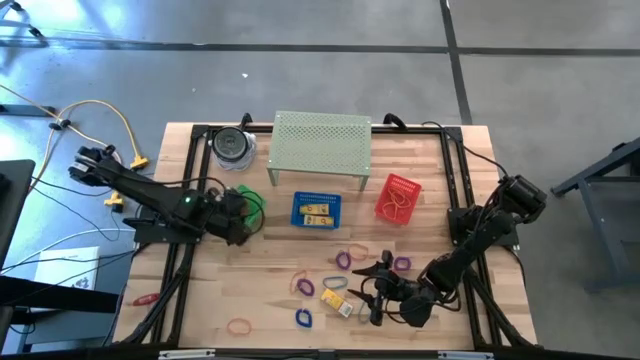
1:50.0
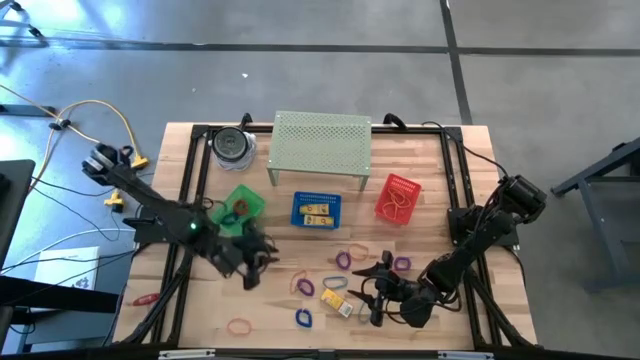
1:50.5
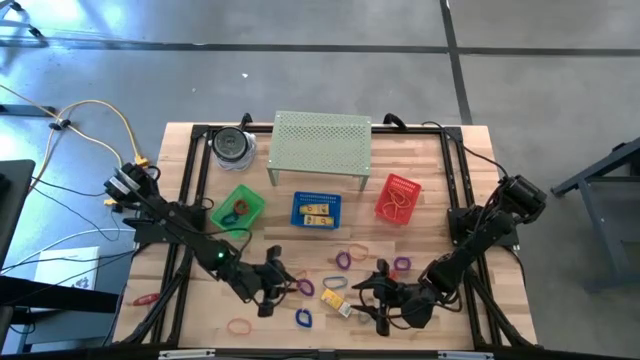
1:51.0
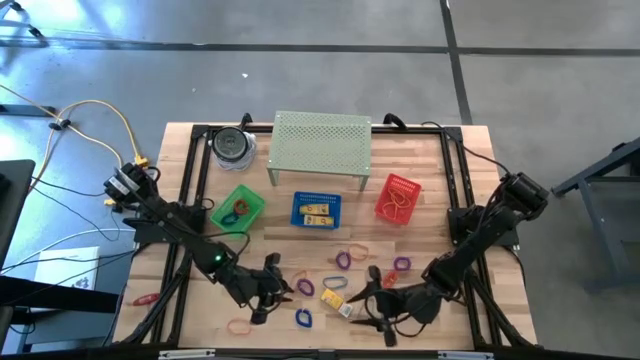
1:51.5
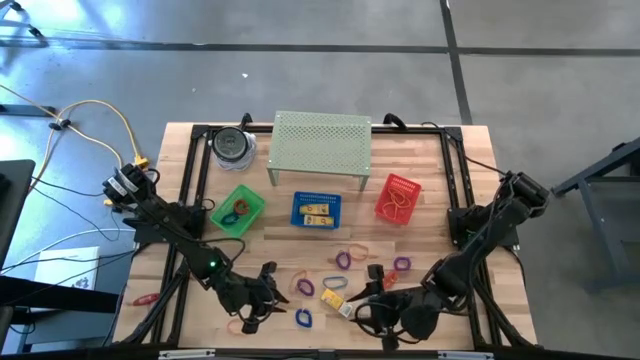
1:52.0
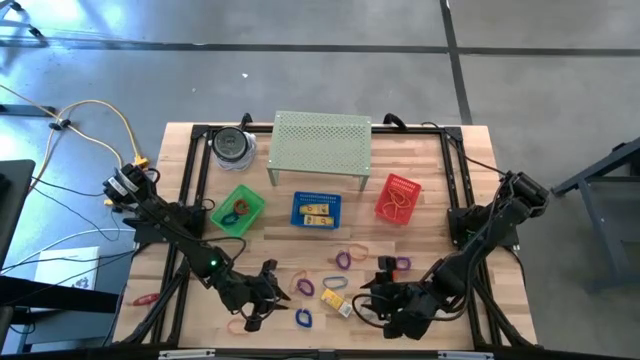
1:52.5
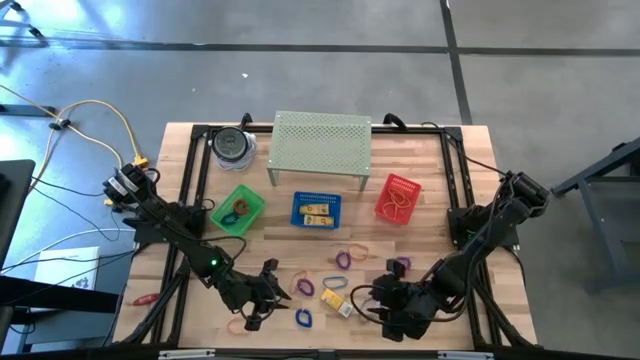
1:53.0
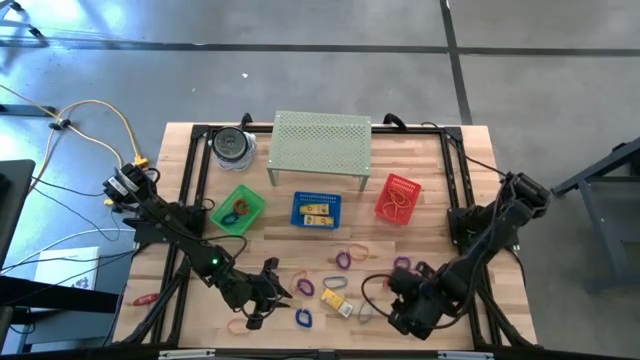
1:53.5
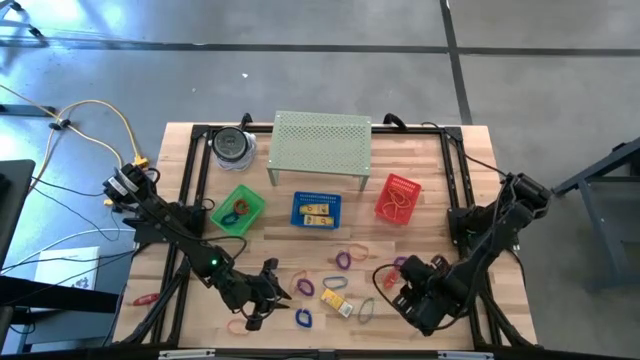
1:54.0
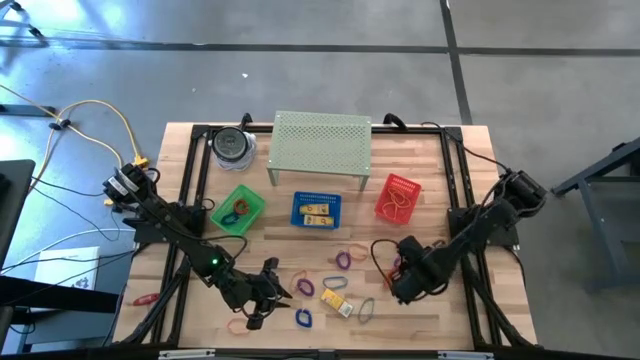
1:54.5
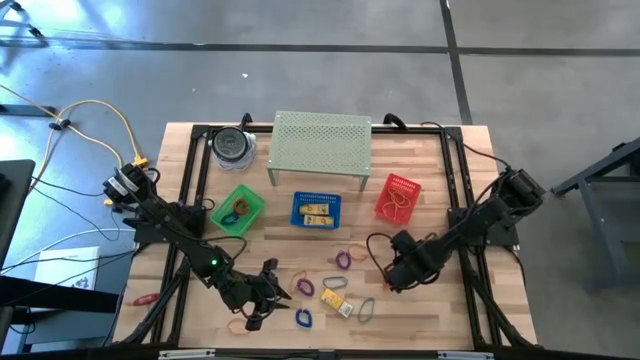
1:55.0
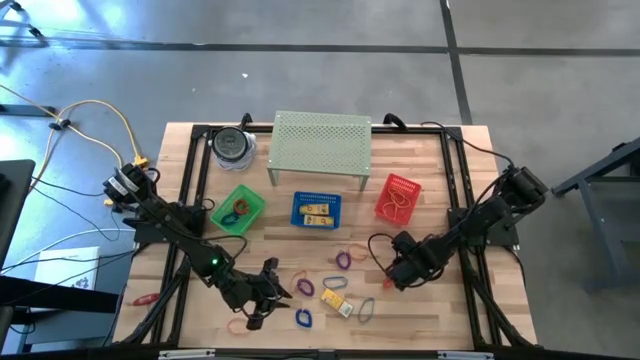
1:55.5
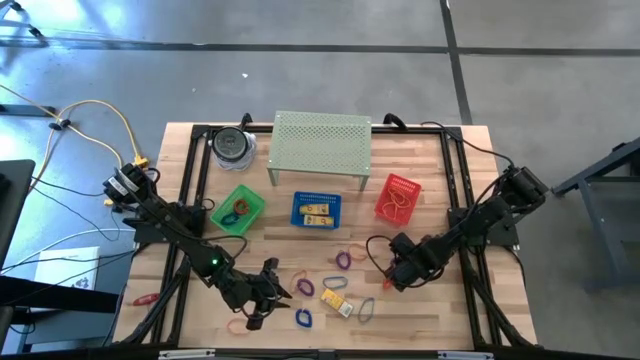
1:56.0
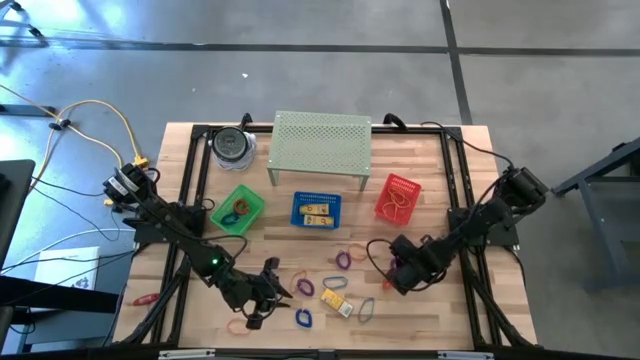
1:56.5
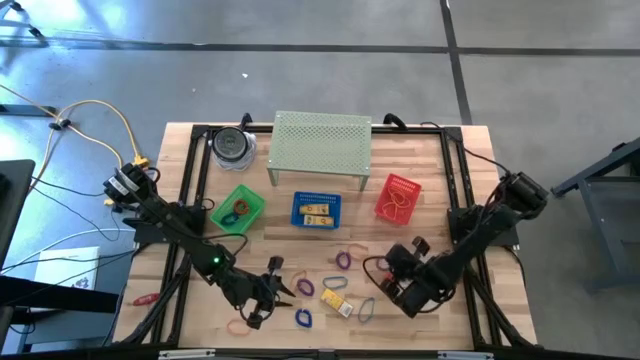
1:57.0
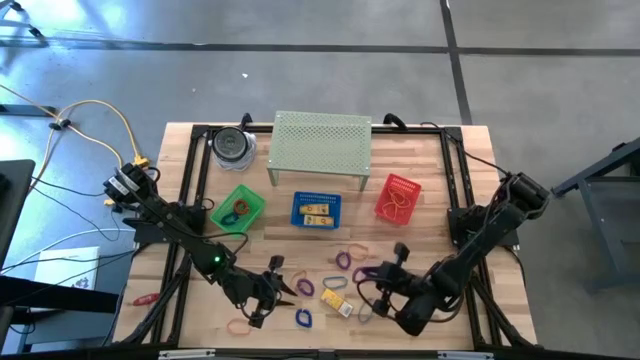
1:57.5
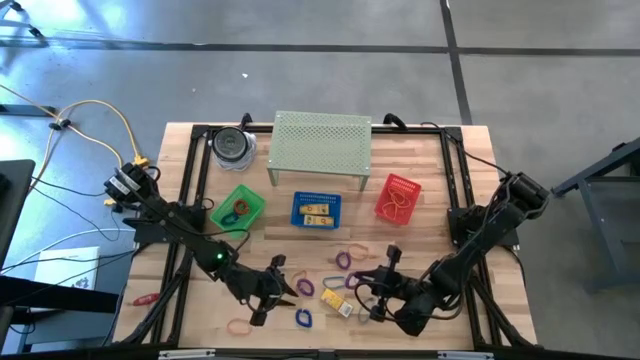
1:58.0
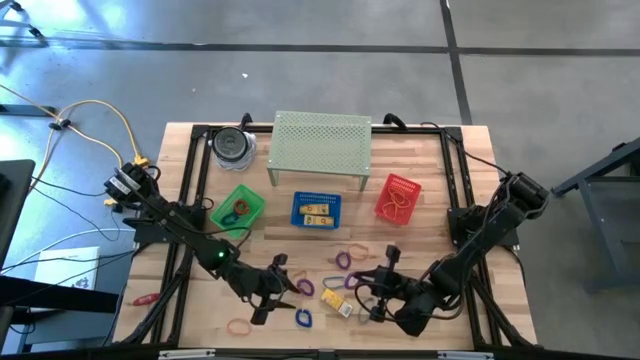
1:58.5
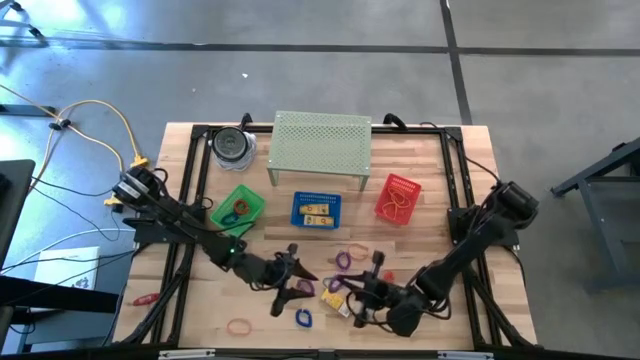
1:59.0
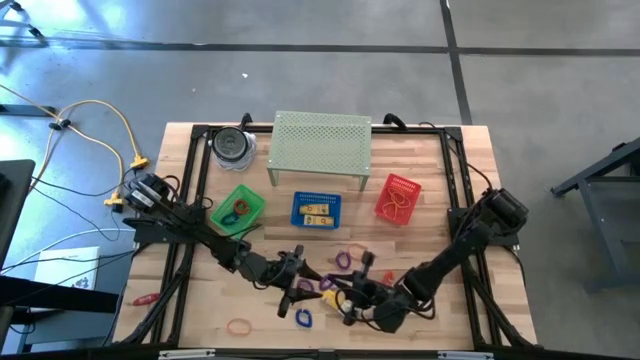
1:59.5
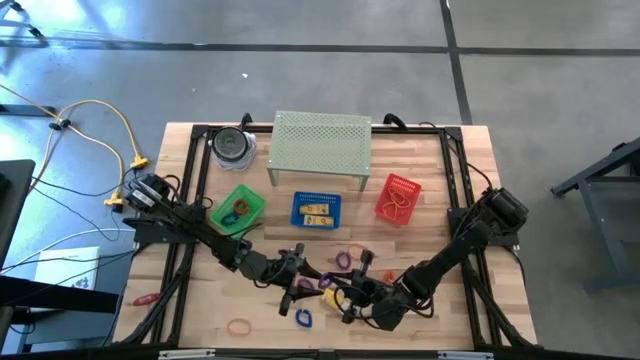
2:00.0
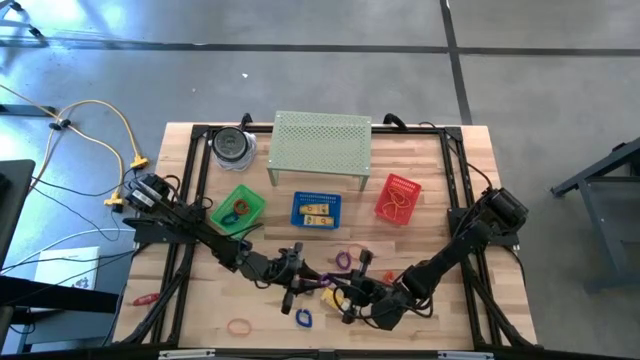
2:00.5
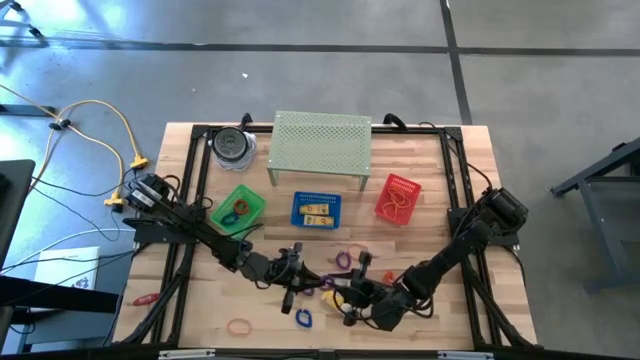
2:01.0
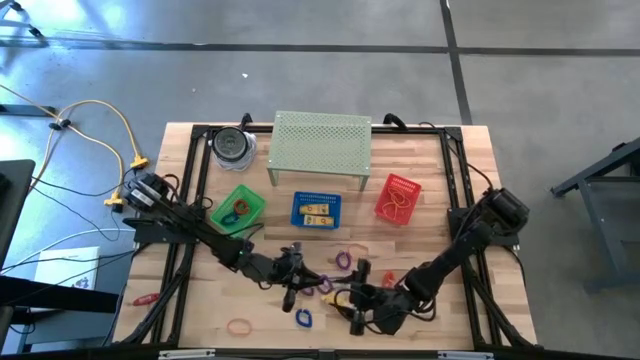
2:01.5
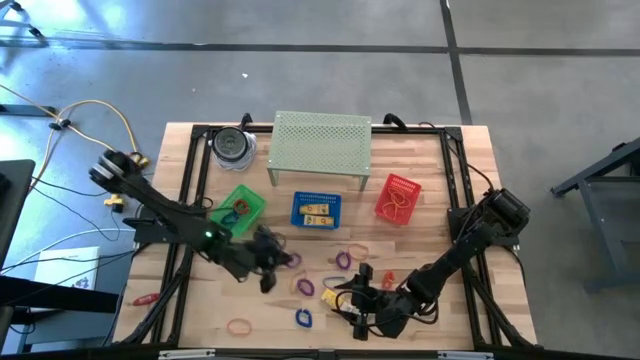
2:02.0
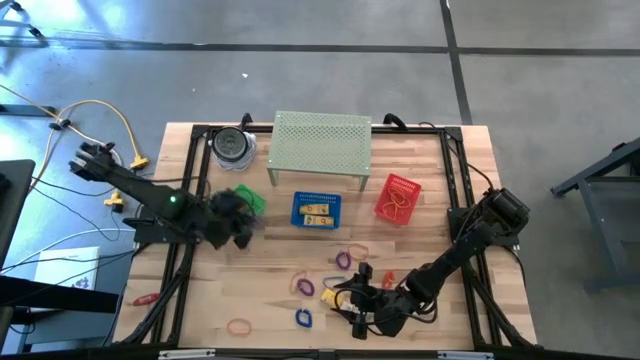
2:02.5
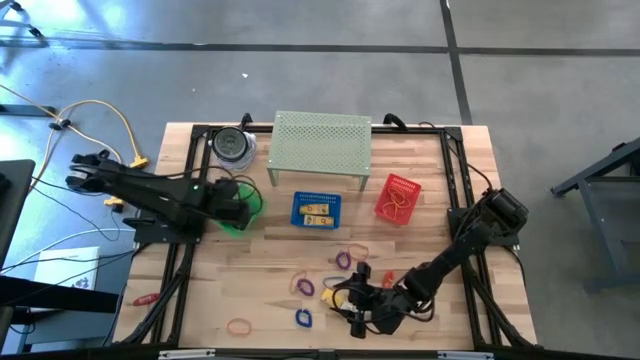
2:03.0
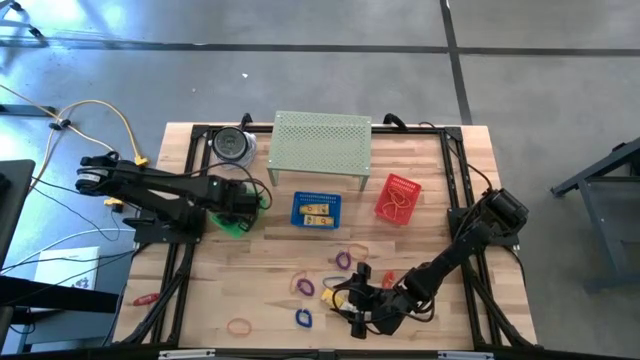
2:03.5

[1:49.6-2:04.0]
Task: Pick & Place Office Desk Supplies
Put the purple spring key chain into the green bin

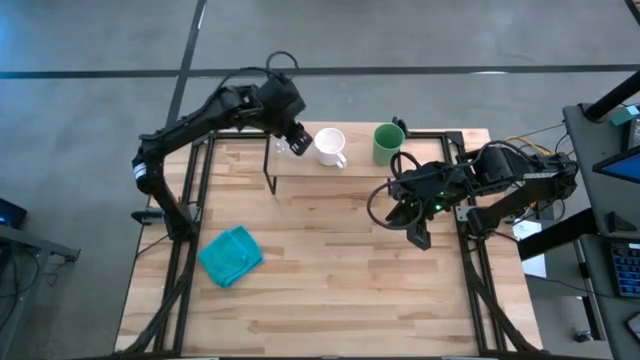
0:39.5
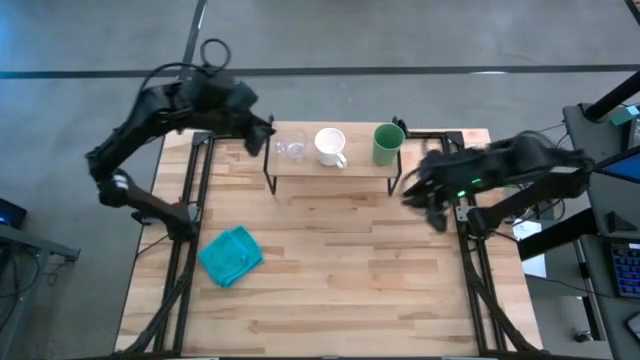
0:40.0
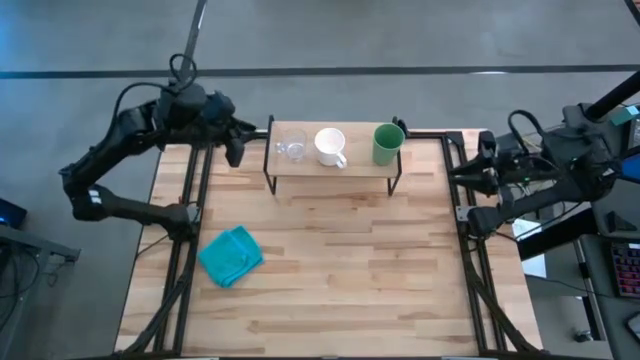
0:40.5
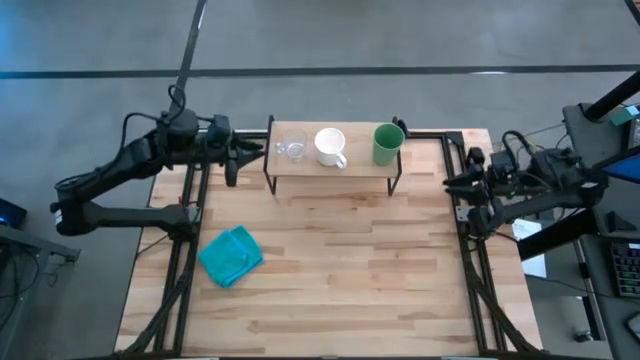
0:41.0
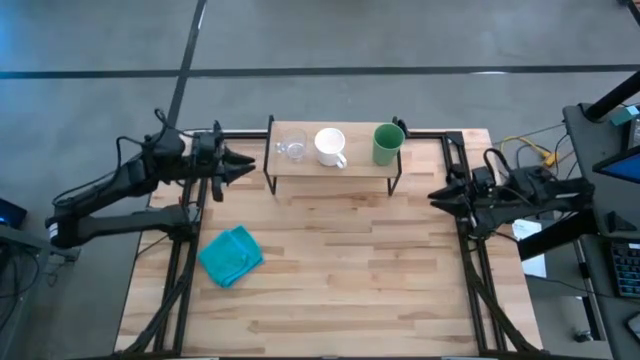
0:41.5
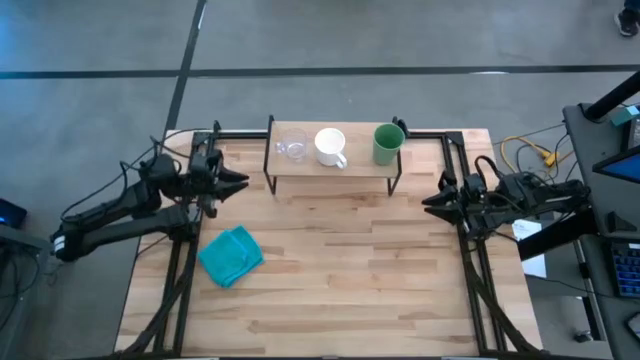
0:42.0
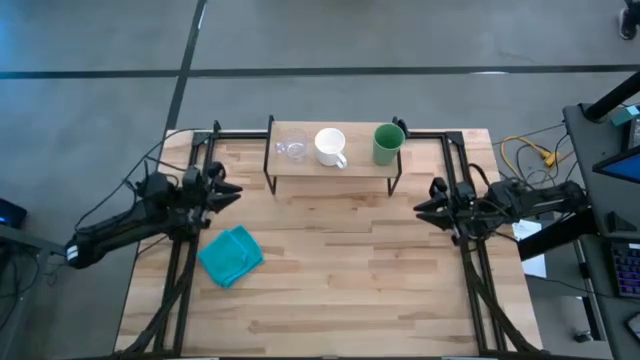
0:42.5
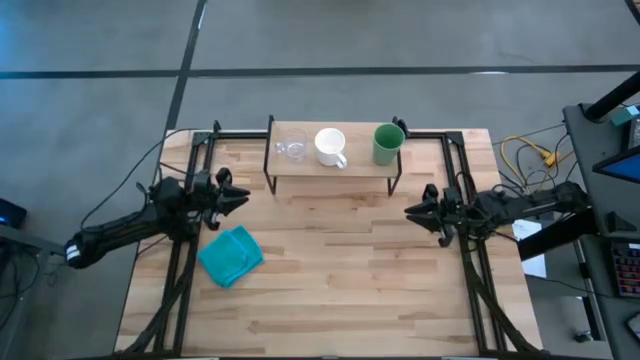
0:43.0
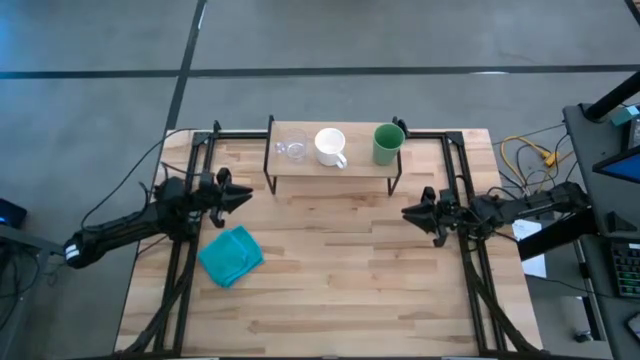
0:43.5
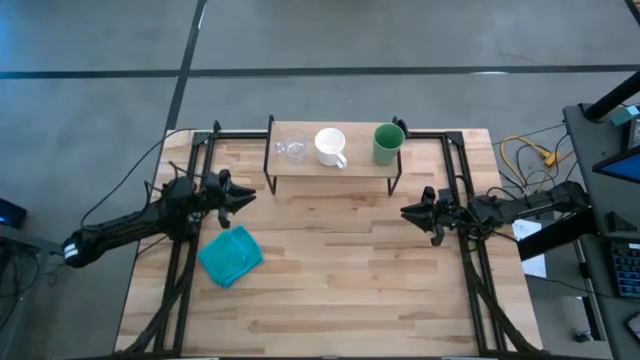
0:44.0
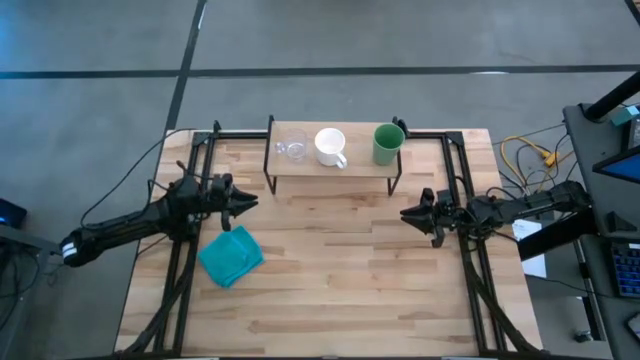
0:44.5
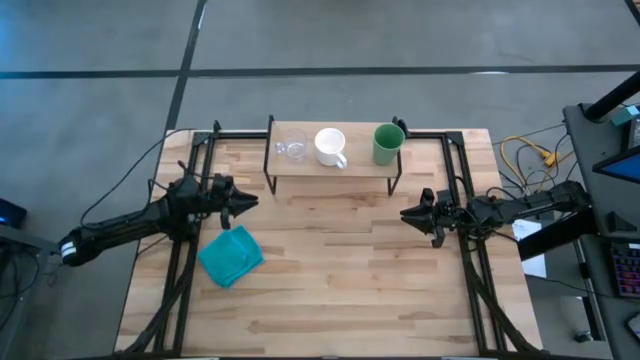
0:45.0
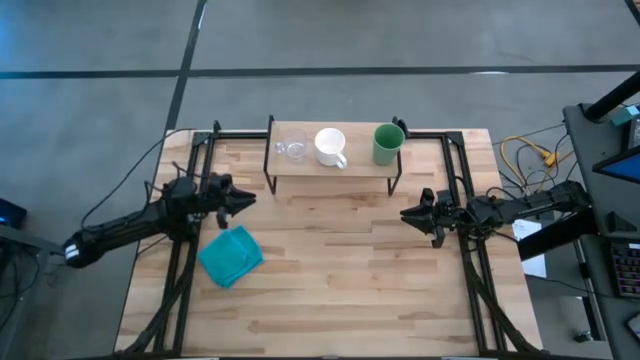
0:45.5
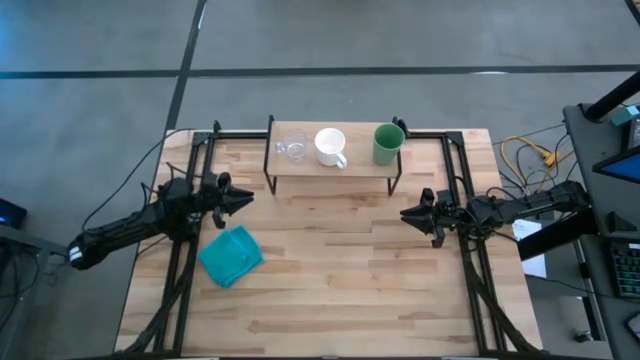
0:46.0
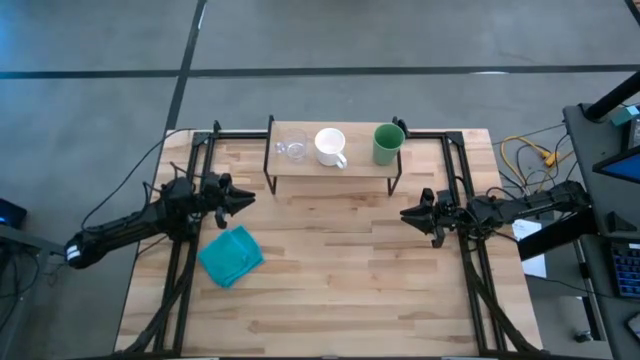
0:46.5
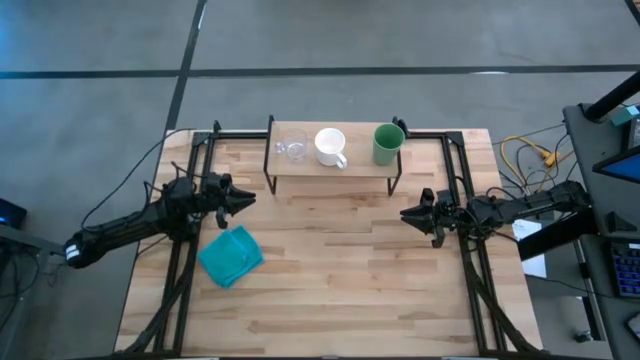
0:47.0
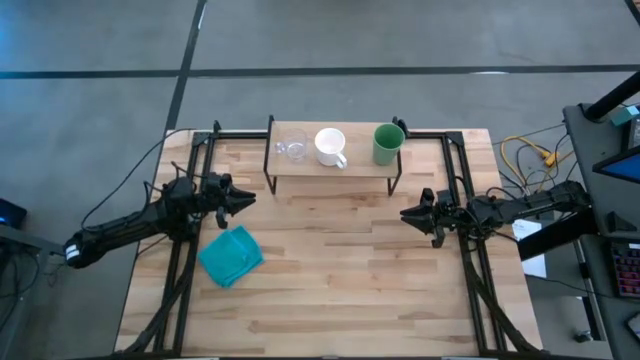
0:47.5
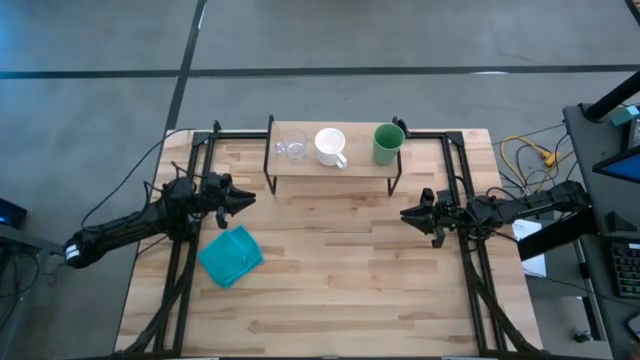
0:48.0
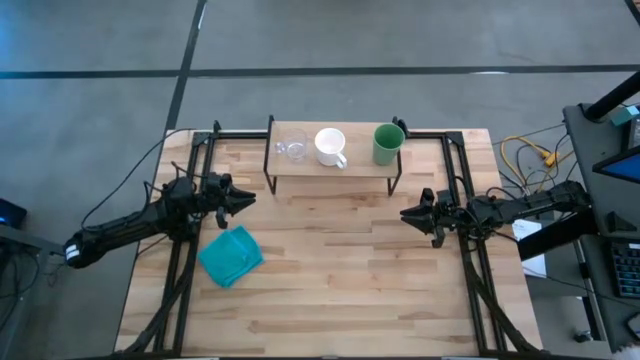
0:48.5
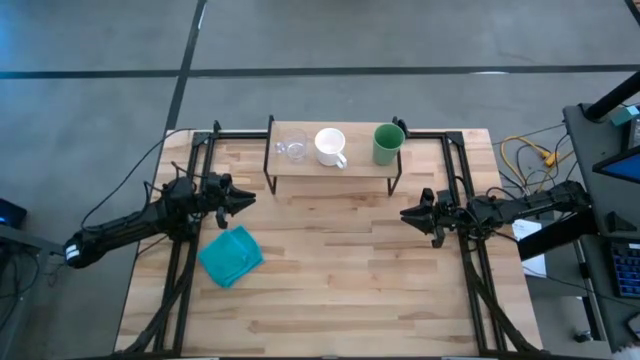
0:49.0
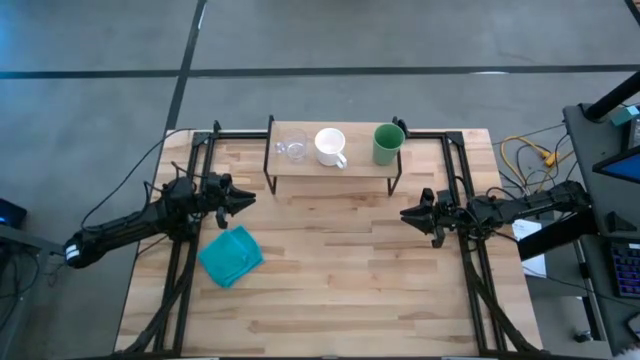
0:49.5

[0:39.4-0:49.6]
Task: Stack small to large cups/mugs on shelf
Return to Home Position
